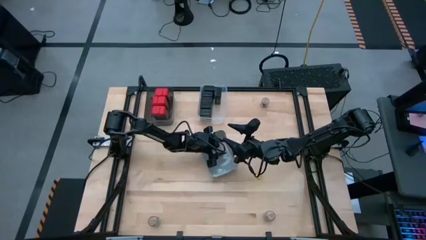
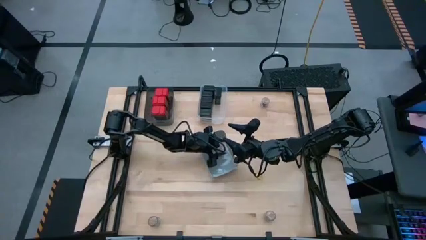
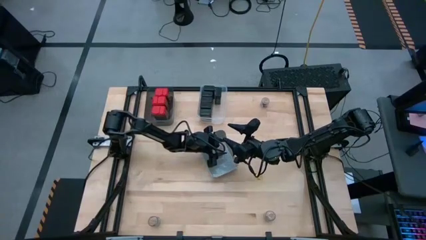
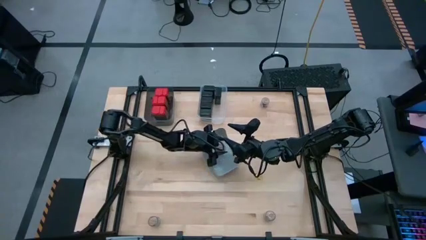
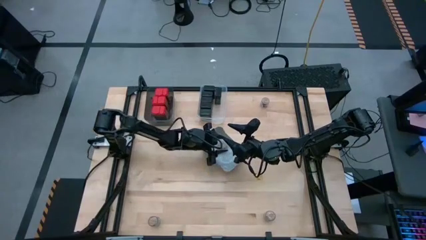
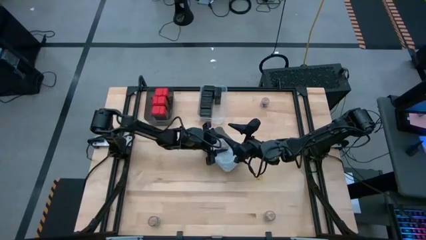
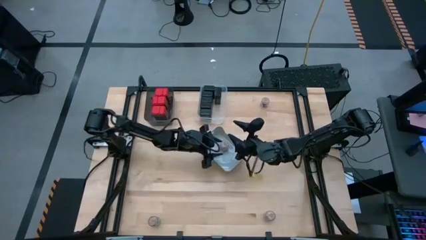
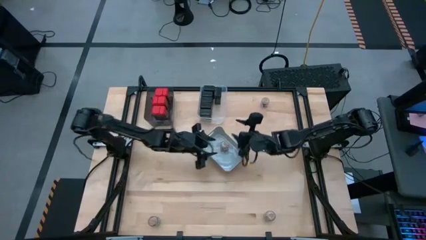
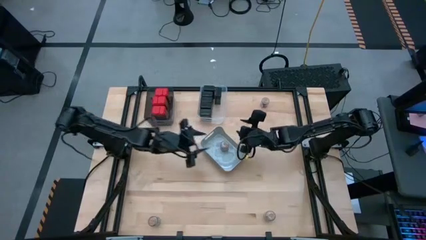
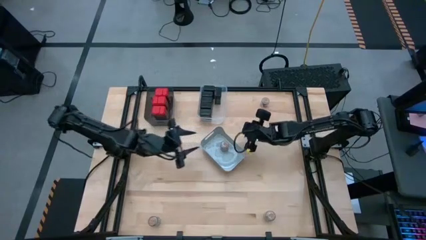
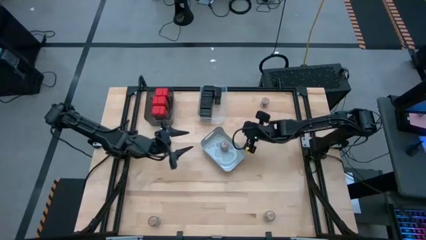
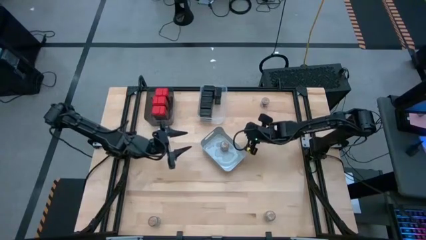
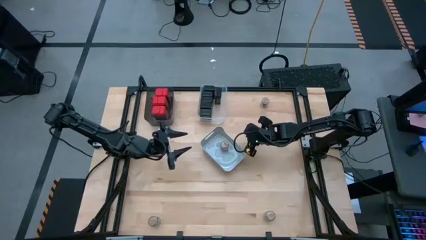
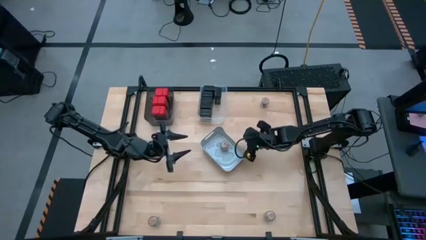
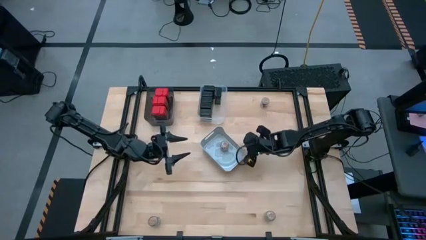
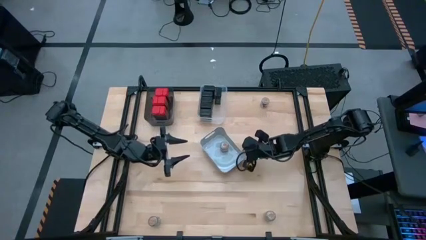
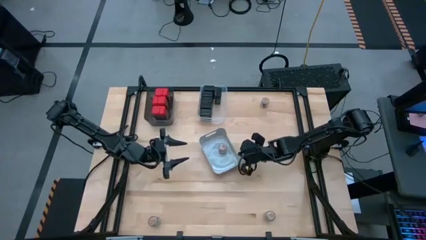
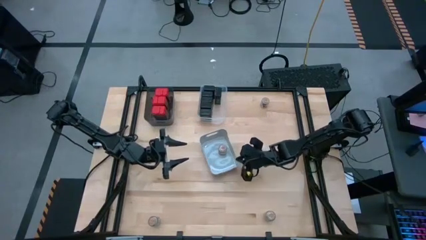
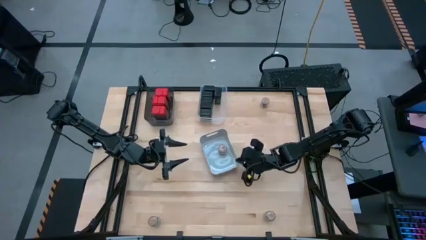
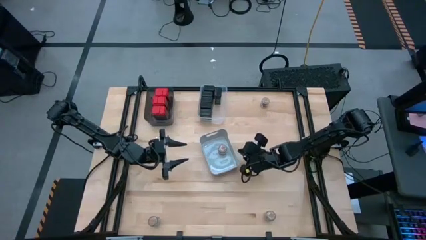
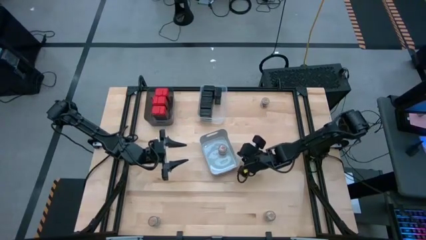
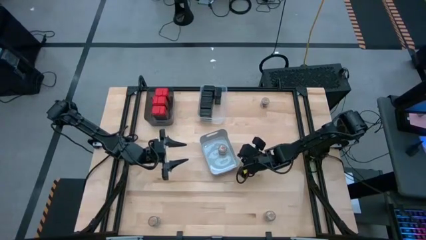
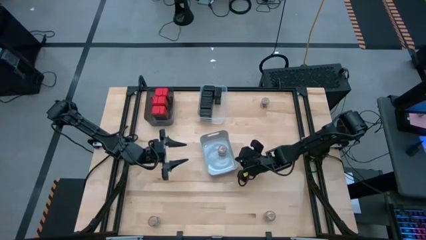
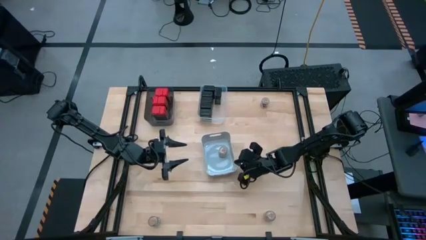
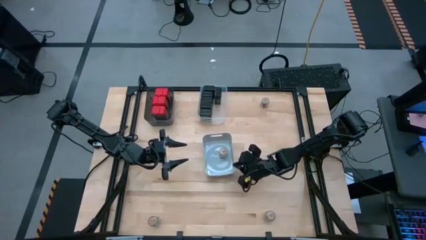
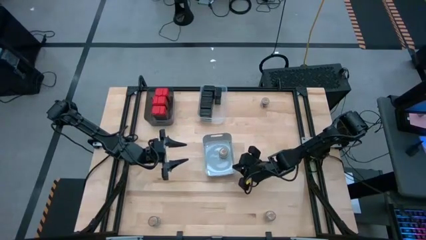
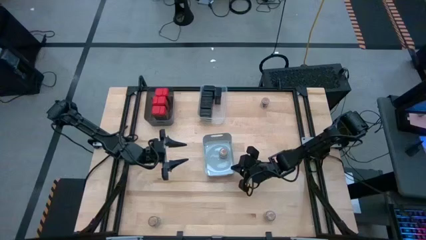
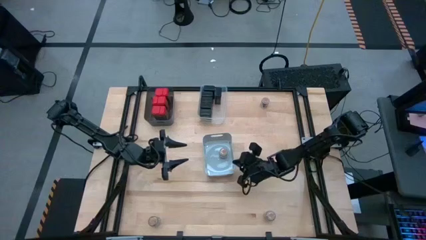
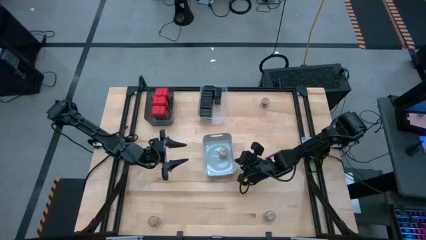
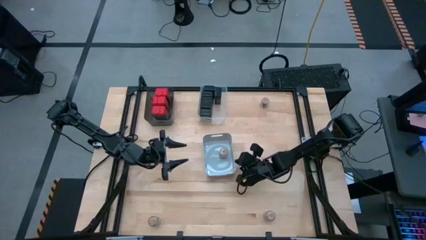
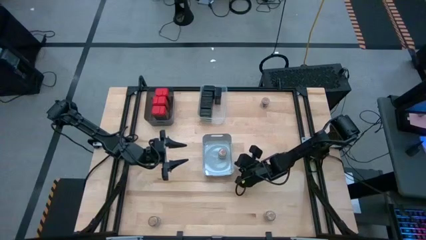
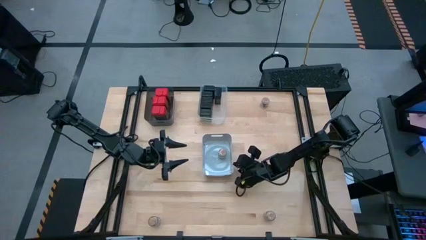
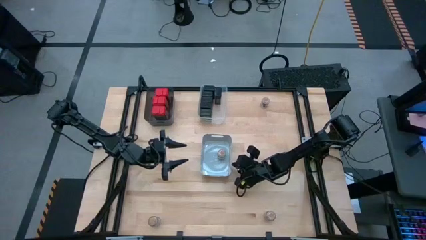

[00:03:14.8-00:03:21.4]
Task: Sort spices by type
Adjust the gray bin on the table

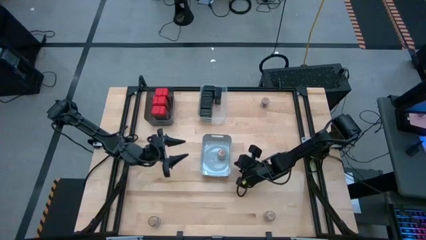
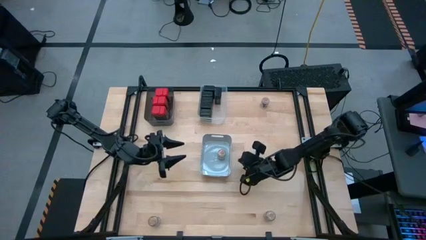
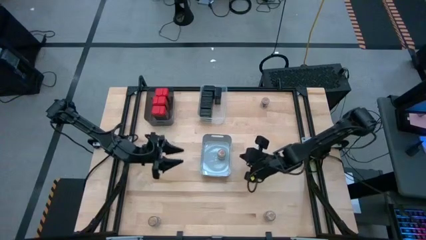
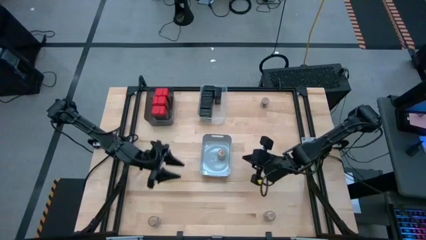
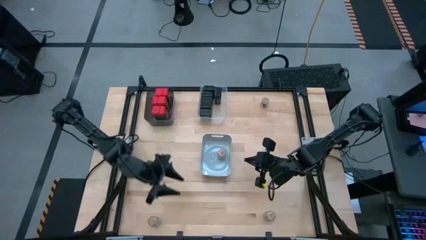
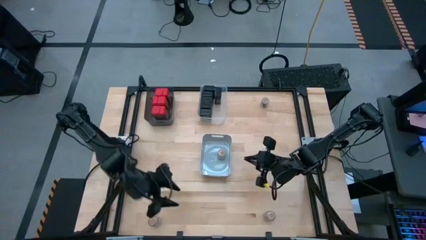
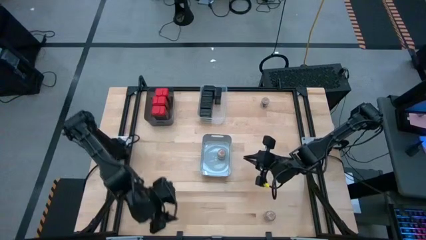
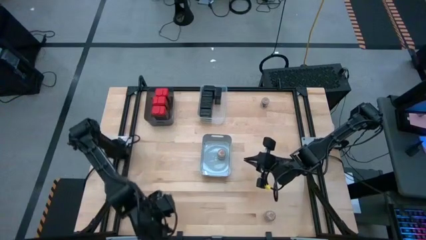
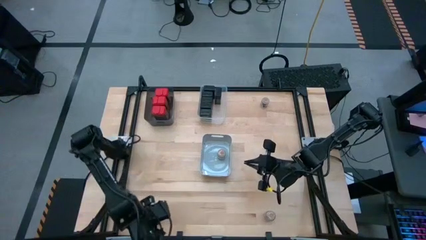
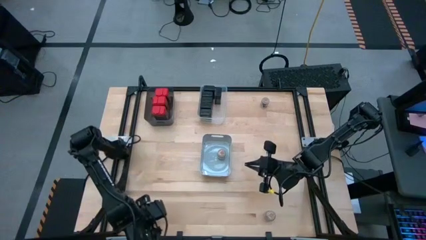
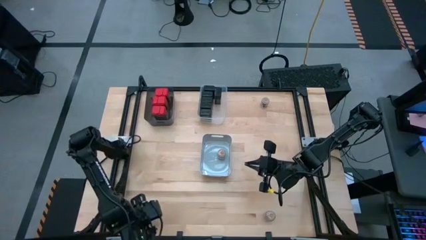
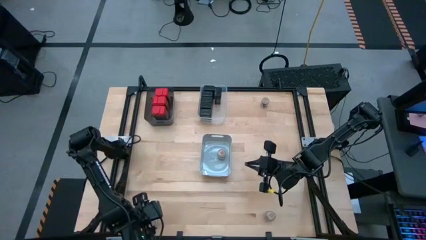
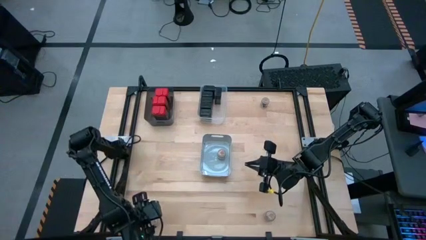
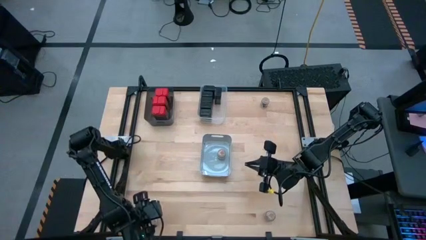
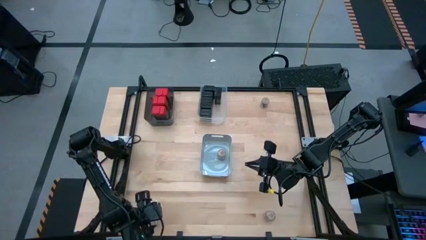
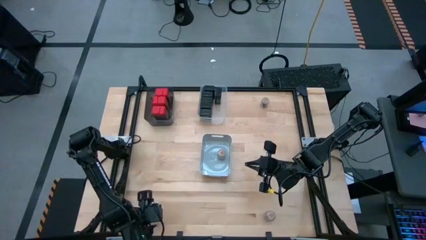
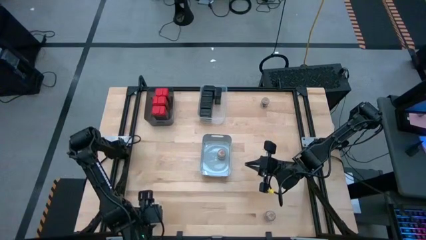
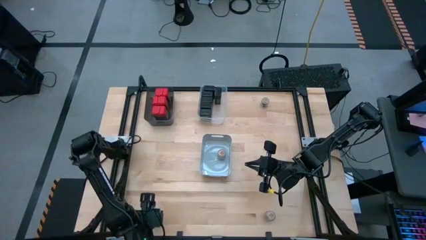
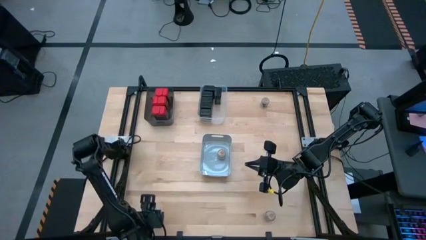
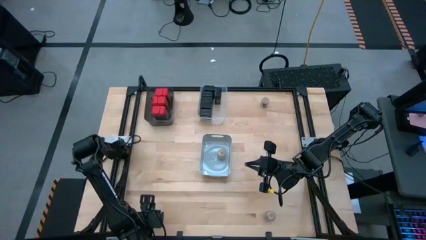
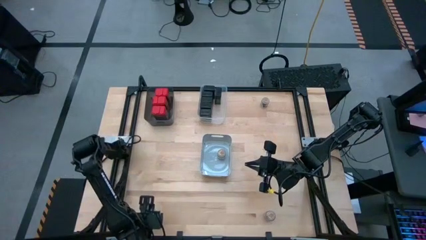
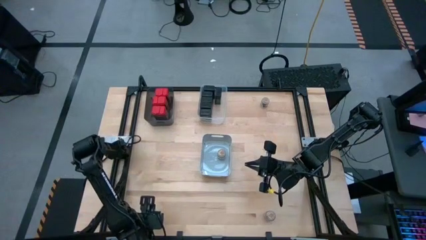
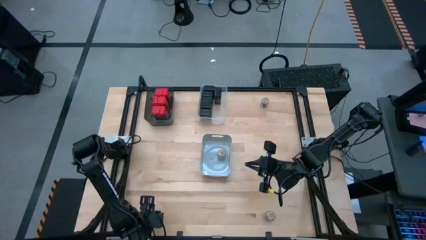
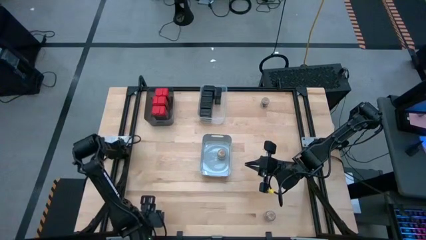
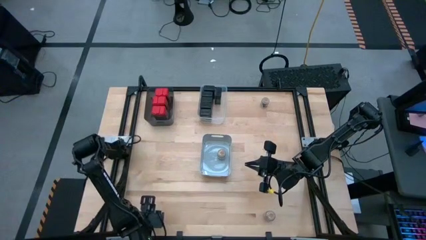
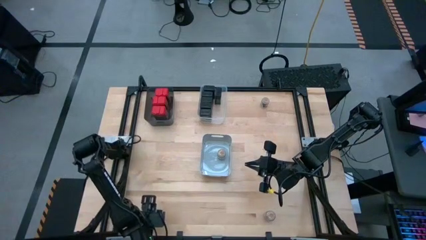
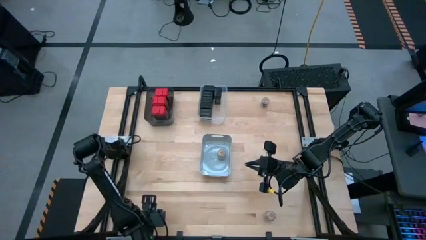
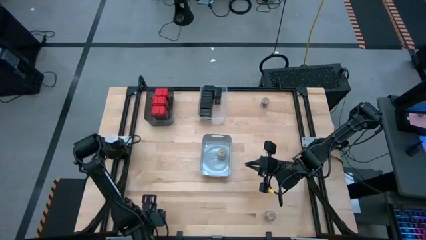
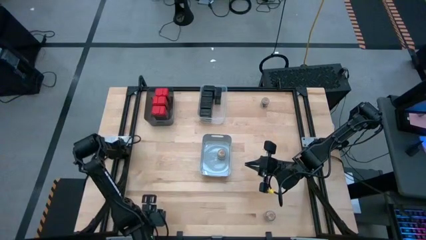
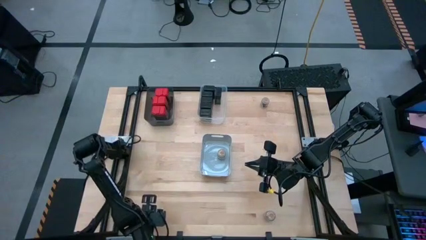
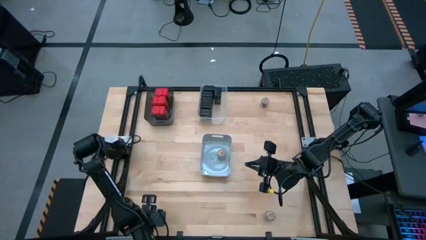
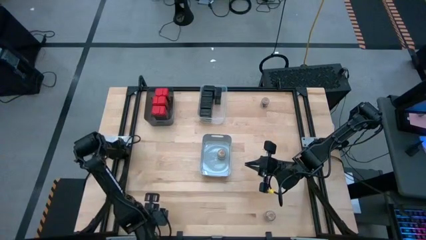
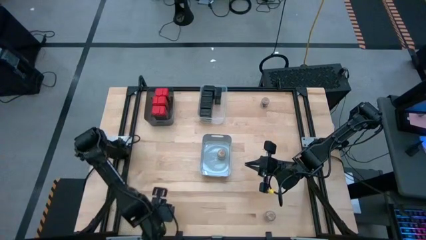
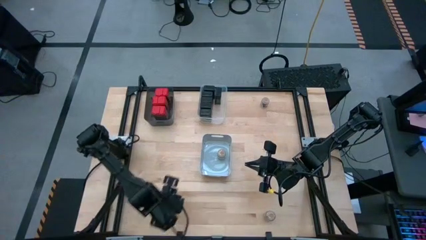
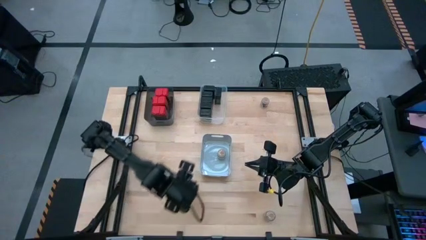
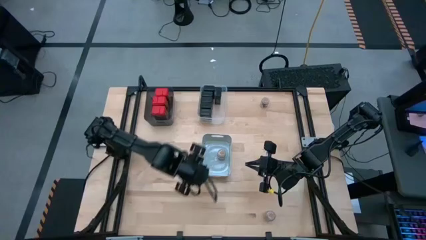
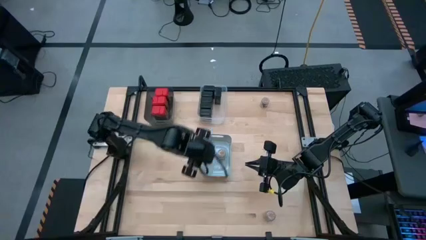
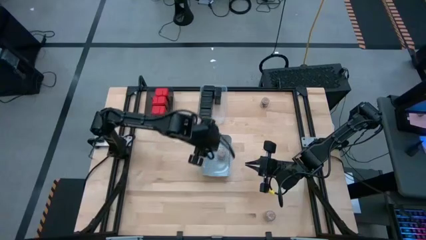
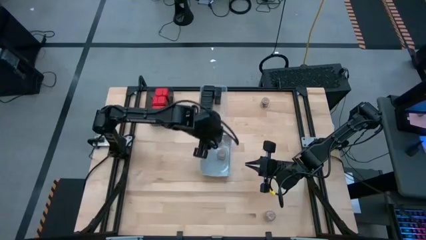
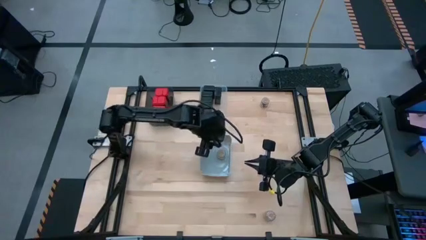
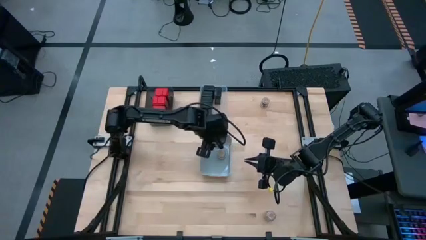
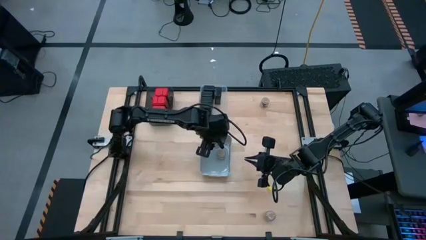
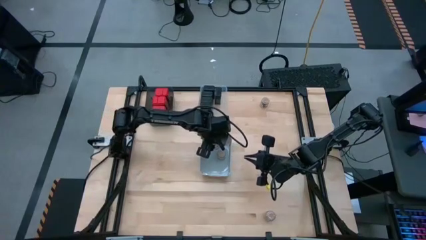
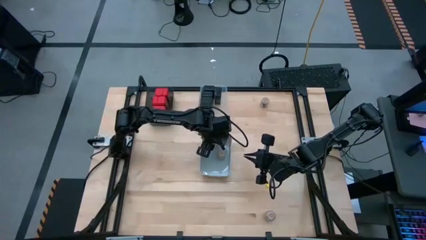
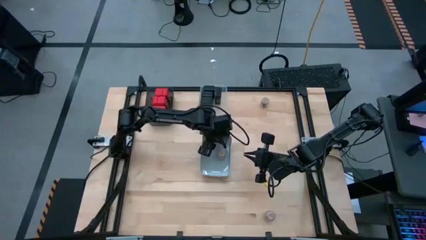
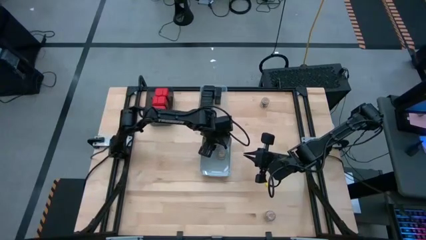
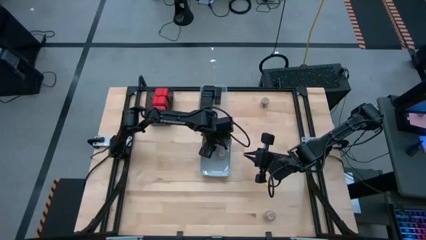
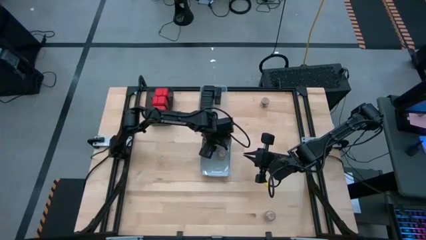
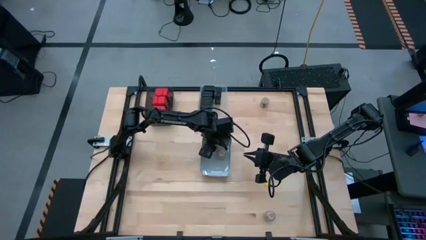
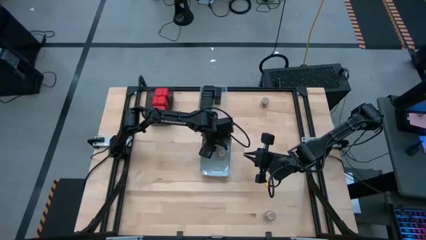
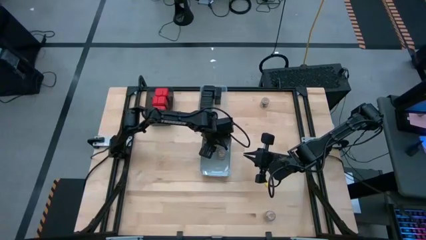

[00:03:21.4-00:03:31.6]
Put the brown seasoning bottle into the gray bin
